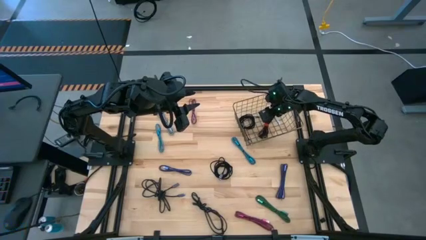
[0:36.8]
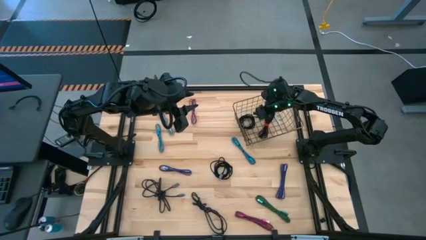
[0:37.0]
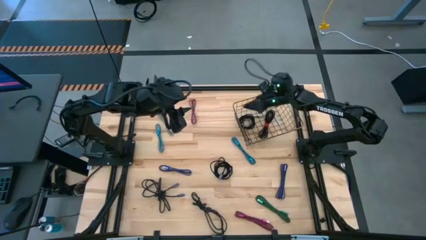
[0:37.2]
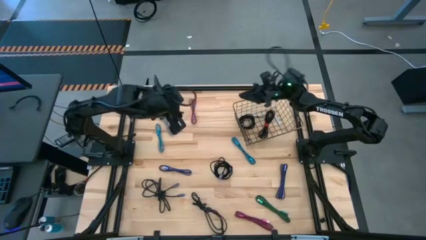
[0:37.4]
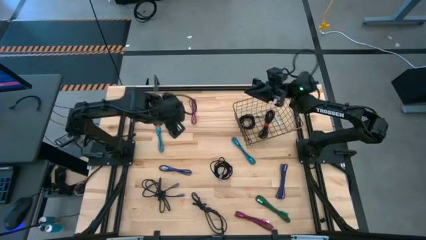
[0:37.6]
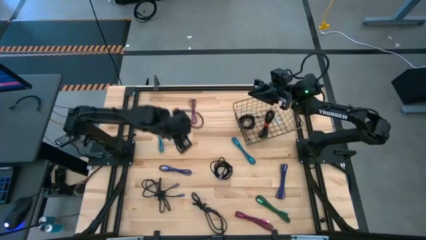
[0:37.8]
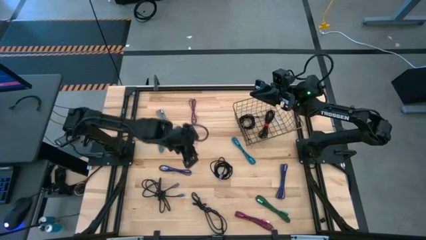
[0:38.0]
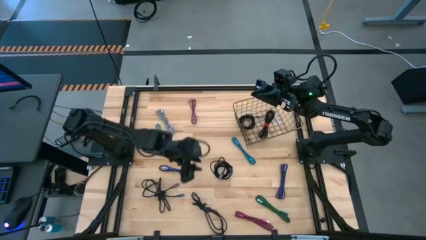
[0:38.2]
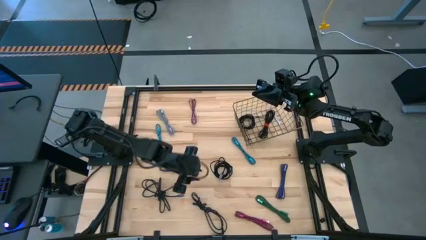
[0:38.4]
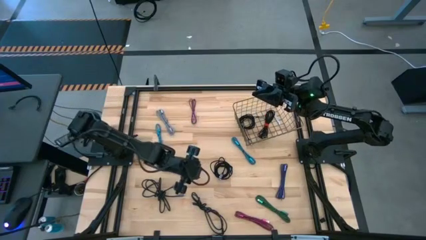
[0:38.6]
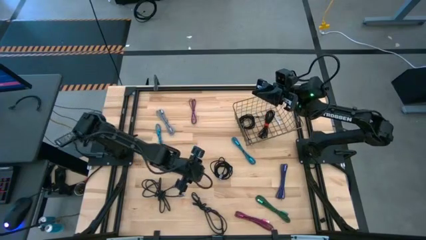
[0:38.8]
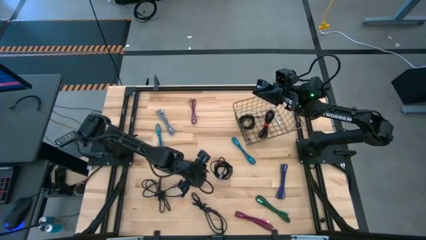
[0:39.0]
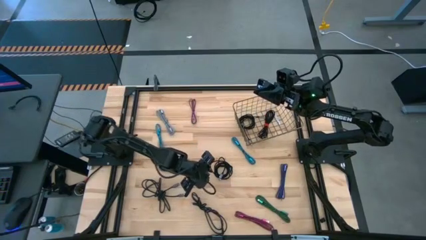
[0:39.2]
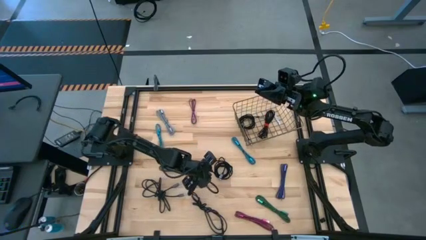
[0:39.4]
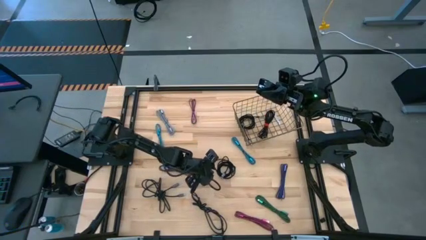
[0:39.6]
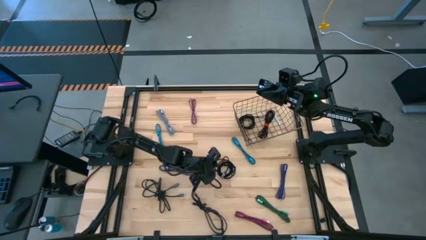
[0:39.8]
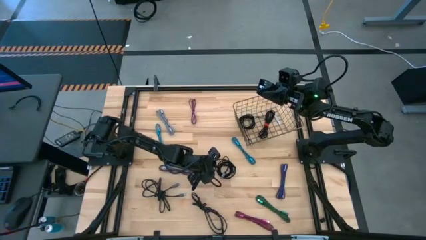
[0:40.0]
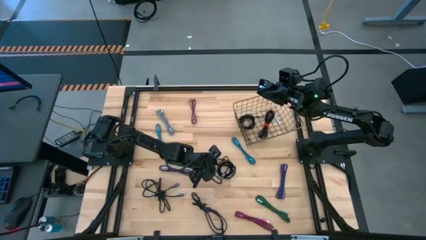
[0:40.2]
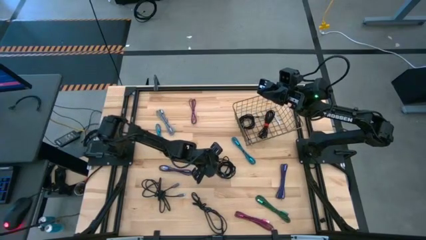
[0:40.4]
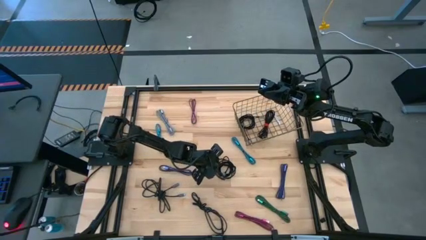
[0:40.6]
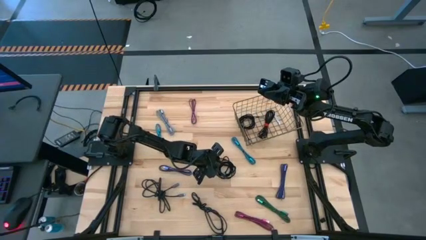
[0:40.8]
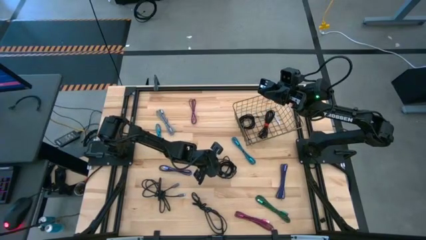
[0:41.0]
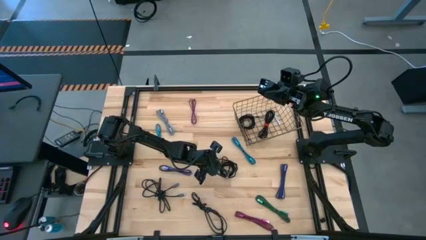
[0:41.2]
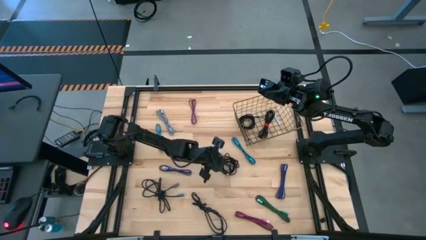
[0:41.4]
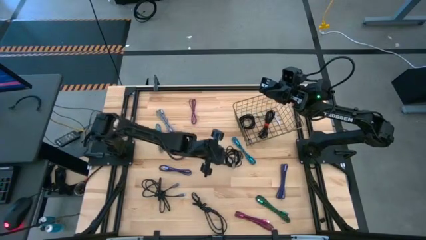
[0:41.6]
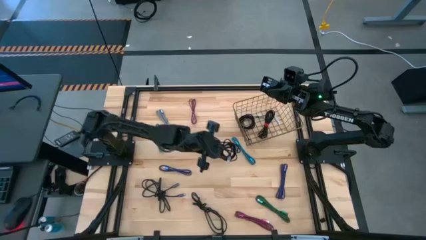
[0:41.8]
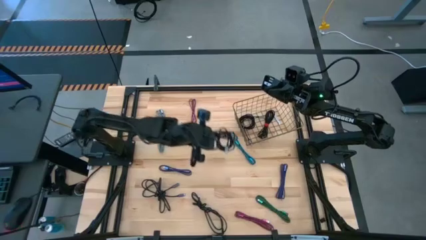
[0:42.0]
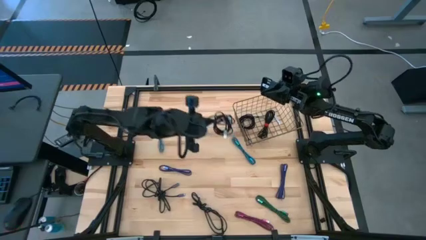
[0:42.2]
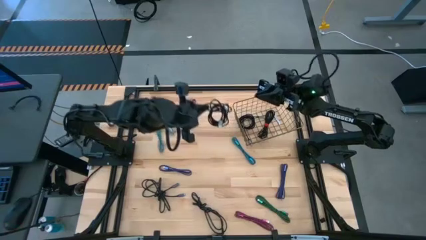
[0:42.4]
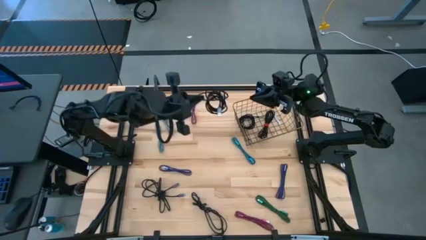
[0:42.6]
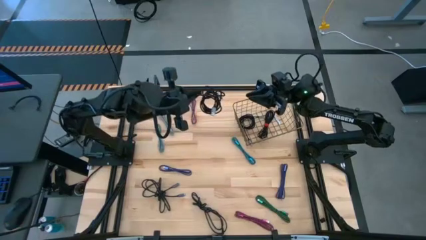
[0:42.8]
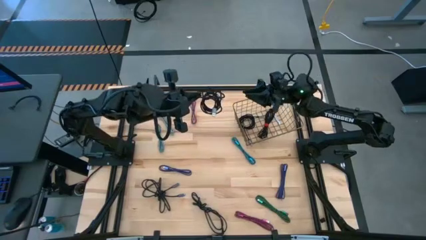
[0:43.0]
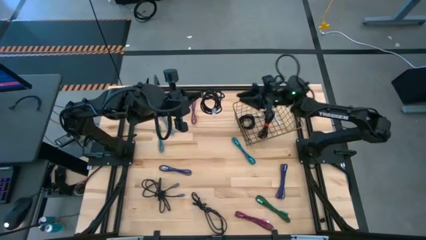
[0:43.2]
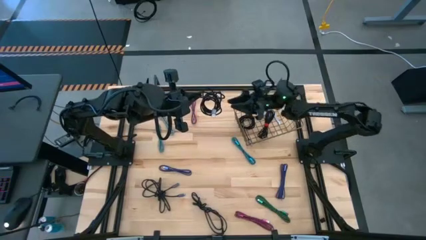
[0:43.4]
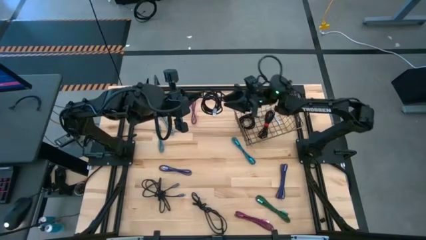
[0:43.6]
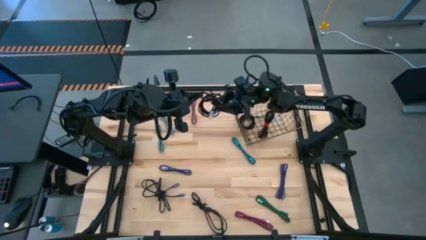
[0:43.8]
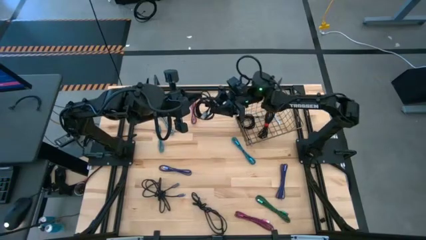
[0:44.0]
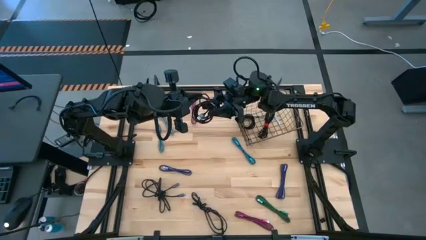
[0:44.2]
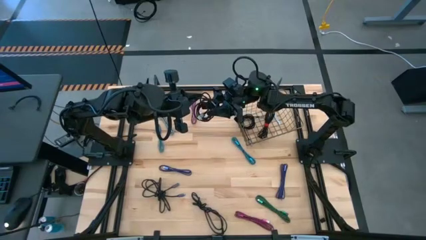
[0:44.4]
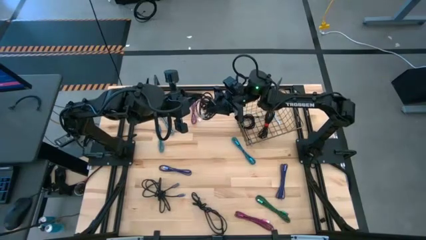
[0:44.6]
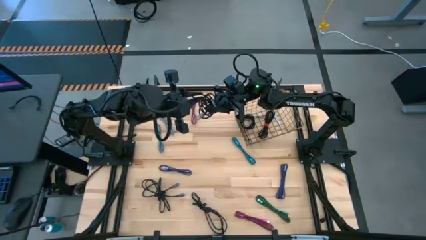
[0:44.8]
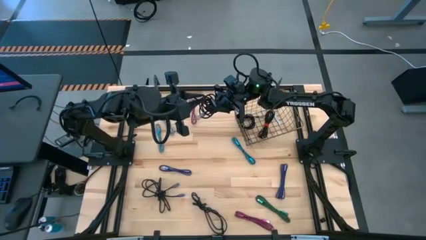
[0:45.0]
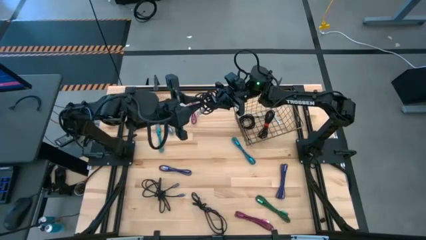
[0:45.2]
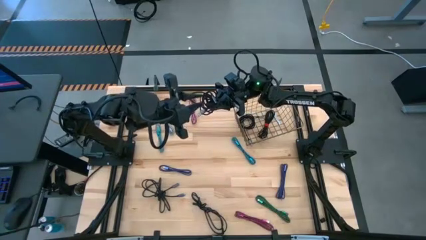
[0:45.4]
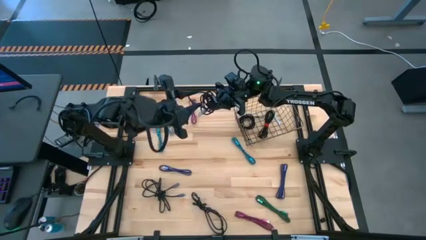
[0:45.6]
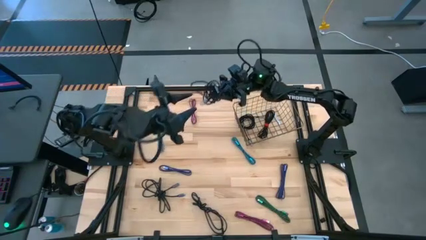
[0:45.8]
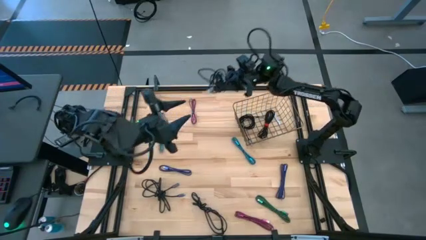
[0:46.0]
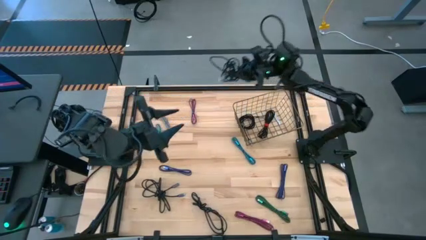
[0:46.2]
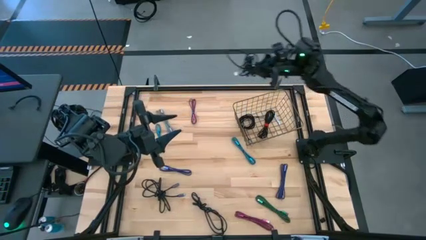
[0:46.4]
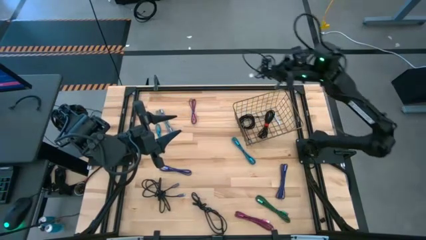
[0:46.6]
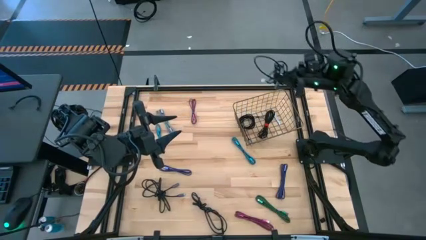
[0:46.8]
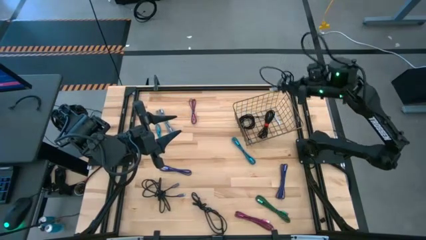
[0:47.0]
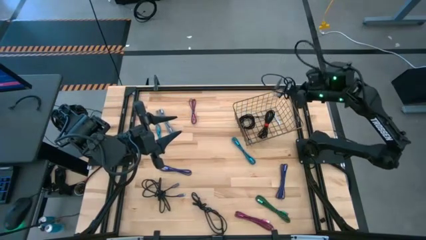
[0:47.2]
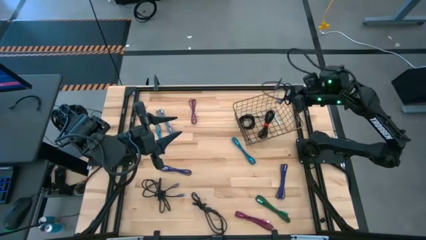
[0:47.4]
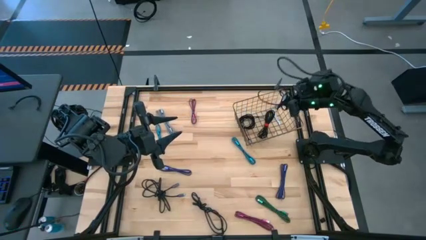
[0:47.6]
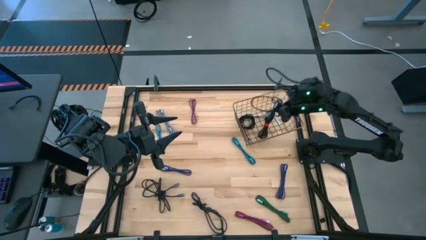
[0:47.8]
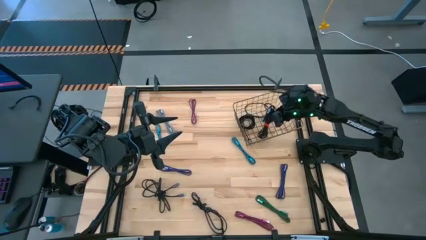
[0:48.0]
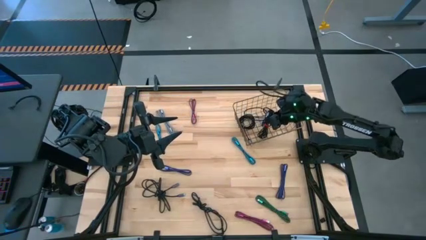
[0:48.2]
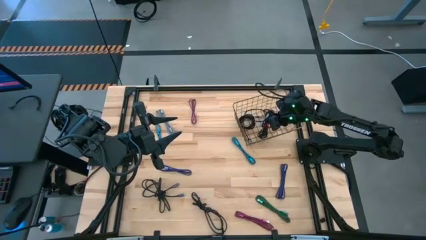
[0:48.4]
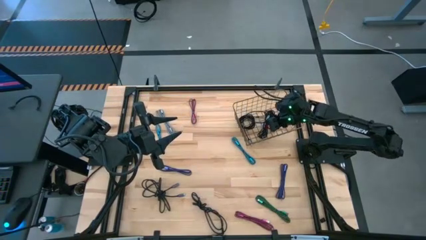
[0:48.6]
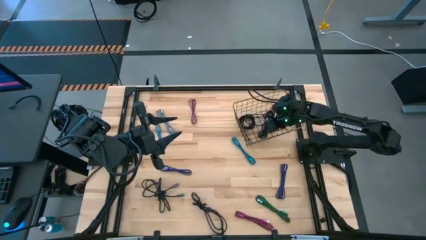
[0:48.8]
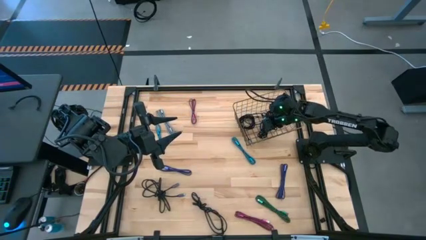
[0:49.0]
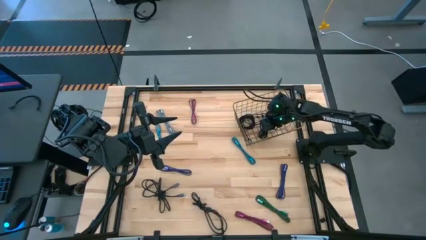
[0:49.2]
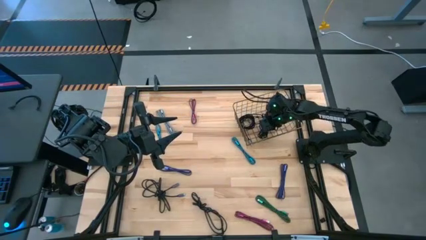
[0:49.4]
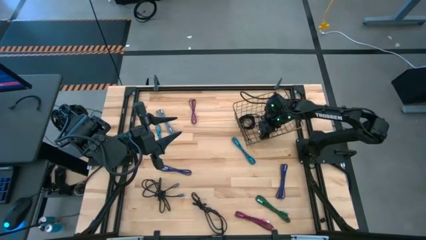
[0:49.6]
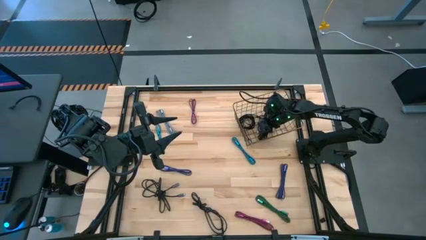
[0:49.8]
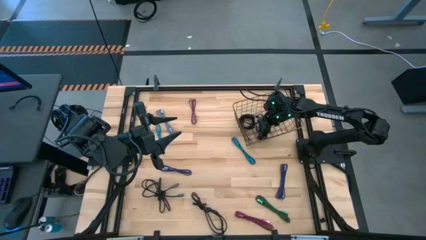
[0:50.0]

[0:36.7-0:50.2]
Task: Pick and place USB-C Cables
Put the black charger cable into the wire basket
